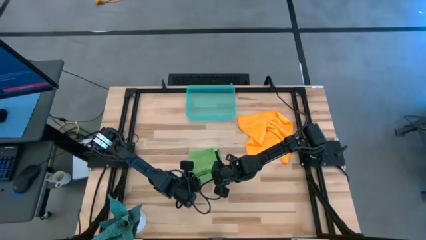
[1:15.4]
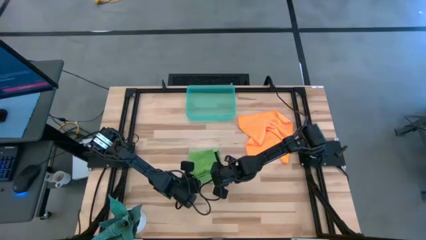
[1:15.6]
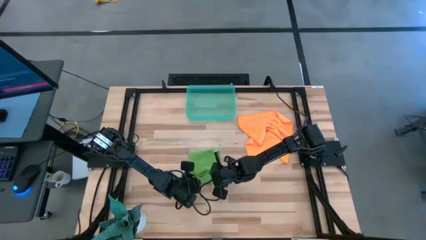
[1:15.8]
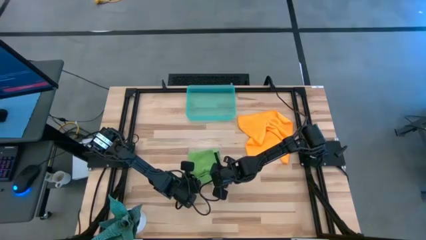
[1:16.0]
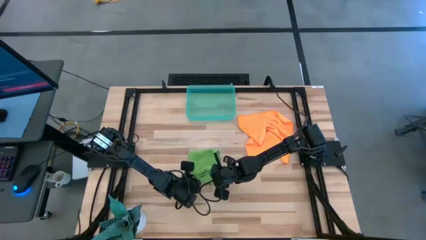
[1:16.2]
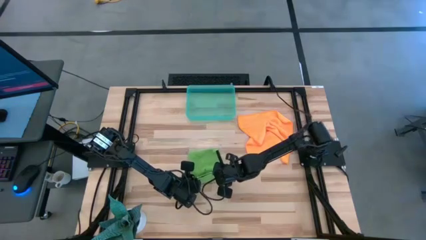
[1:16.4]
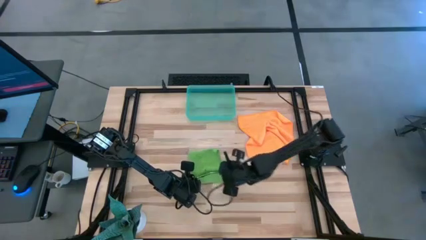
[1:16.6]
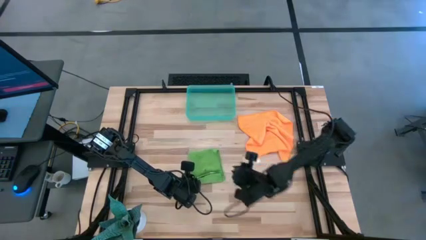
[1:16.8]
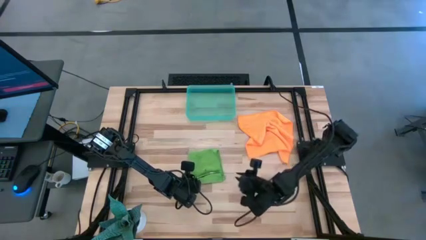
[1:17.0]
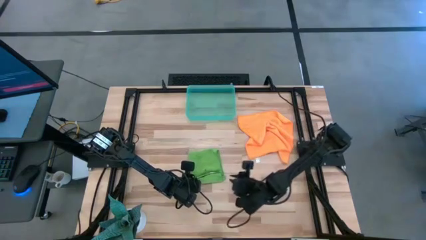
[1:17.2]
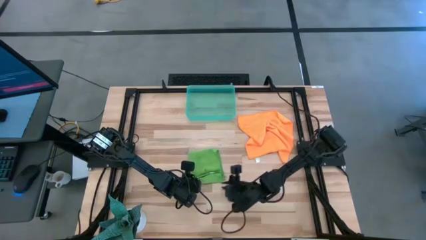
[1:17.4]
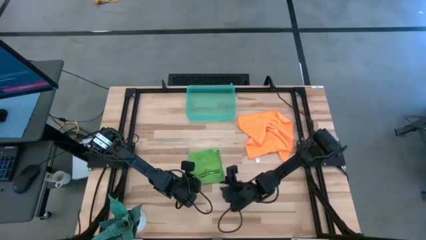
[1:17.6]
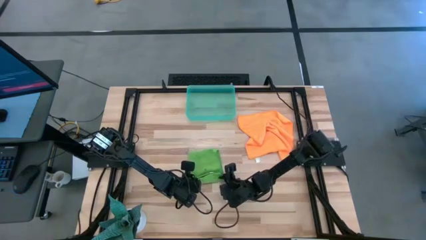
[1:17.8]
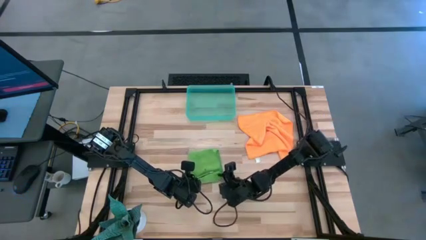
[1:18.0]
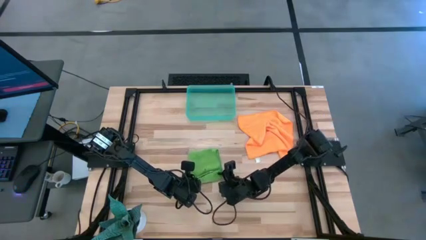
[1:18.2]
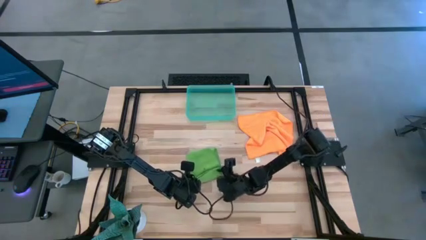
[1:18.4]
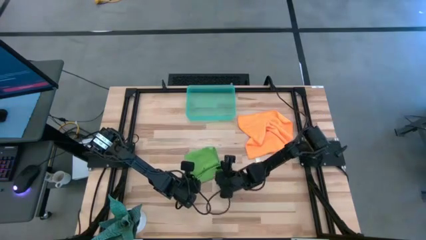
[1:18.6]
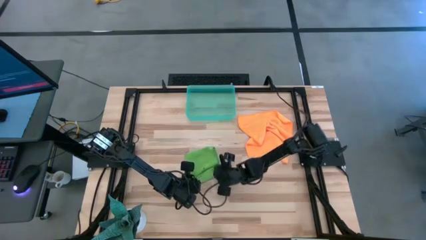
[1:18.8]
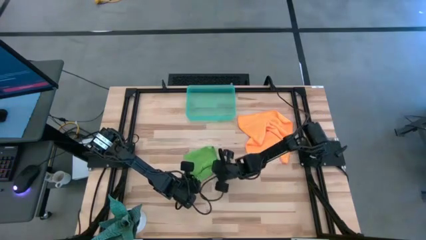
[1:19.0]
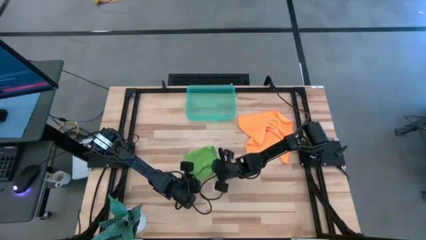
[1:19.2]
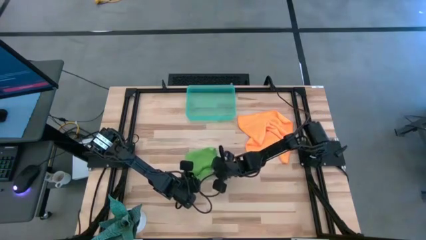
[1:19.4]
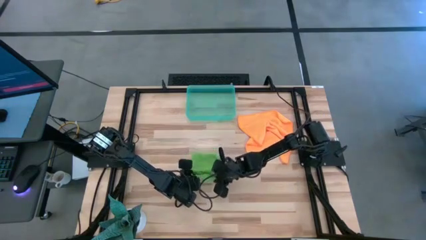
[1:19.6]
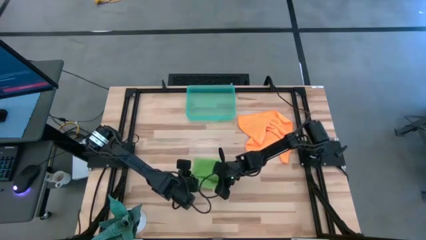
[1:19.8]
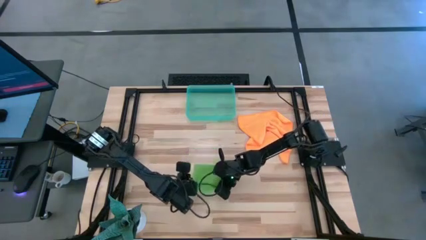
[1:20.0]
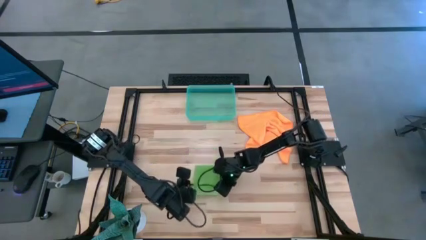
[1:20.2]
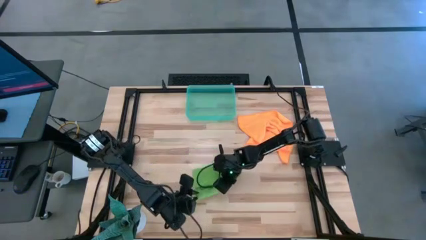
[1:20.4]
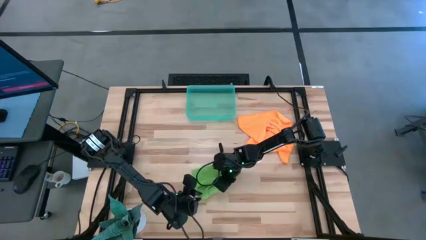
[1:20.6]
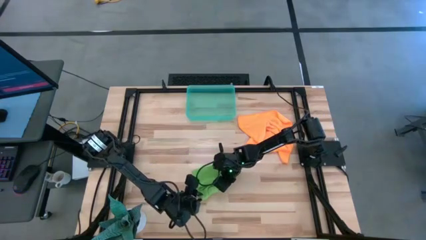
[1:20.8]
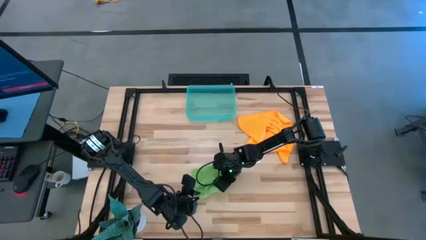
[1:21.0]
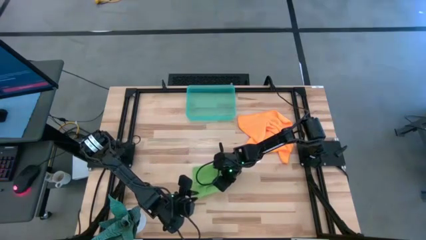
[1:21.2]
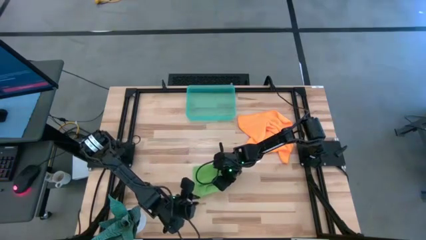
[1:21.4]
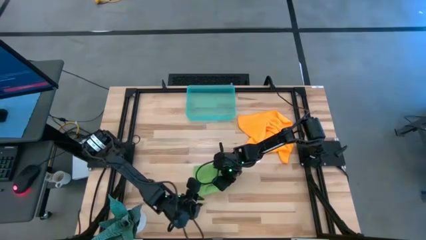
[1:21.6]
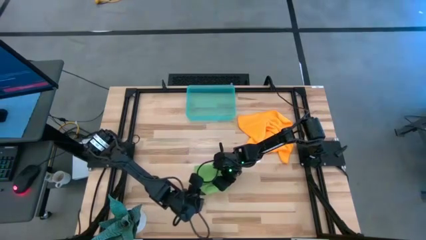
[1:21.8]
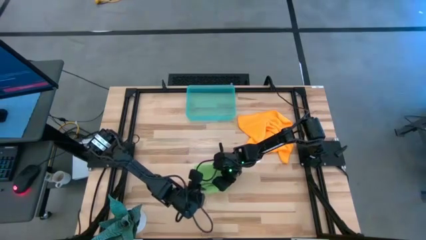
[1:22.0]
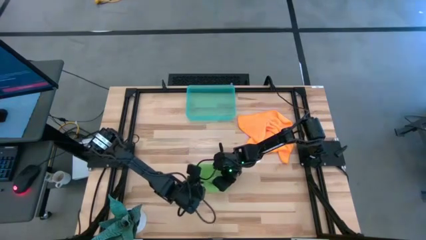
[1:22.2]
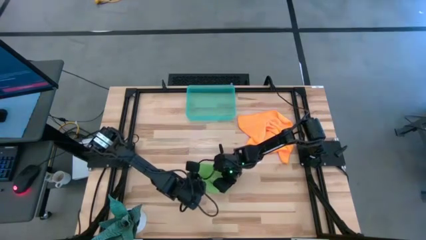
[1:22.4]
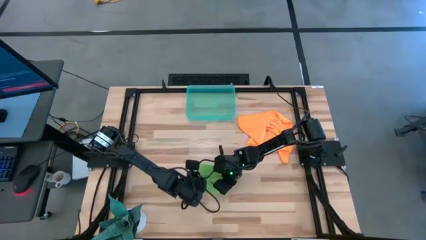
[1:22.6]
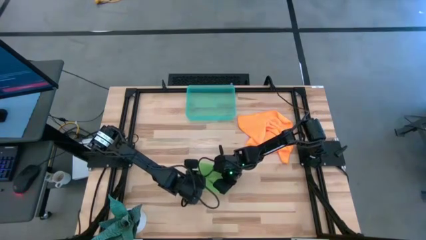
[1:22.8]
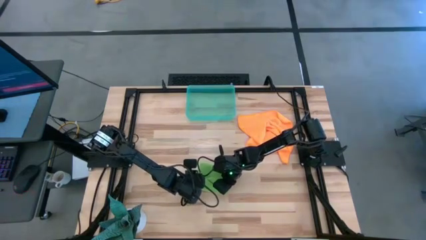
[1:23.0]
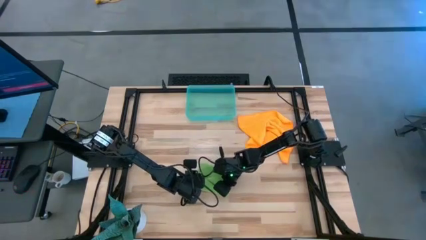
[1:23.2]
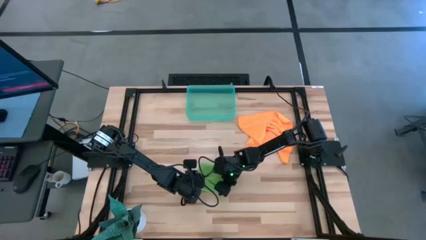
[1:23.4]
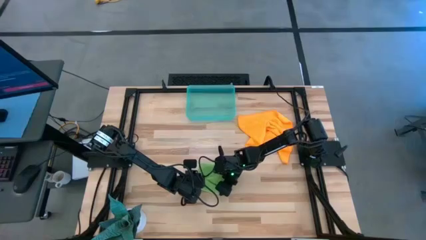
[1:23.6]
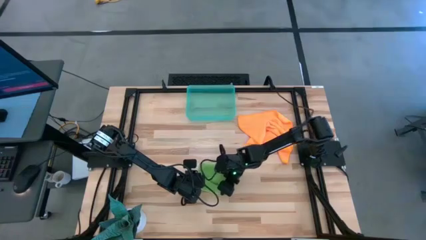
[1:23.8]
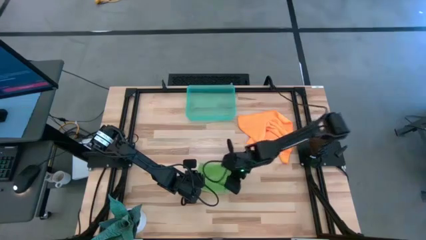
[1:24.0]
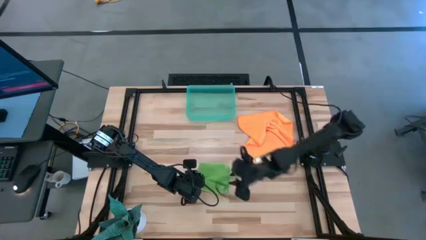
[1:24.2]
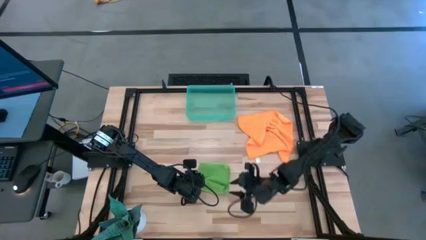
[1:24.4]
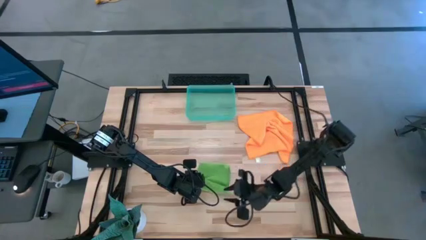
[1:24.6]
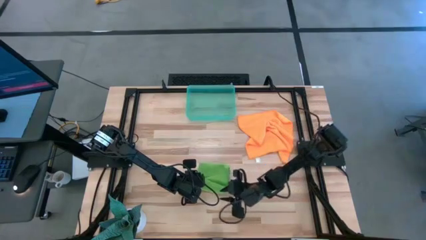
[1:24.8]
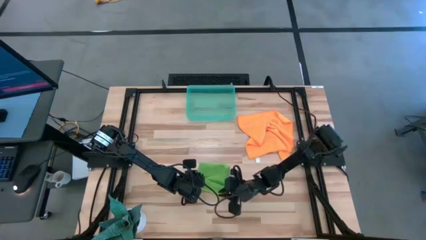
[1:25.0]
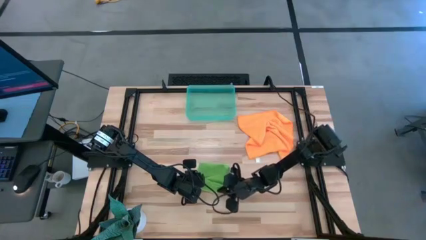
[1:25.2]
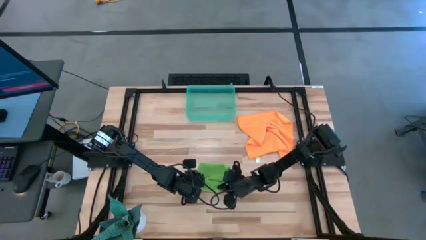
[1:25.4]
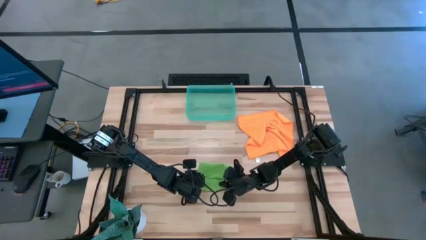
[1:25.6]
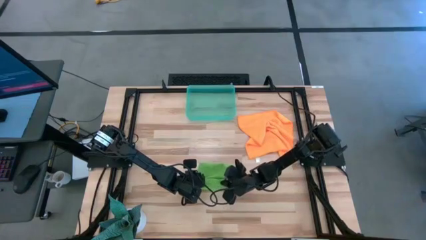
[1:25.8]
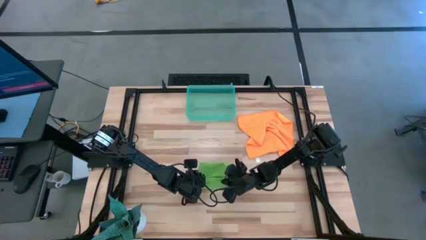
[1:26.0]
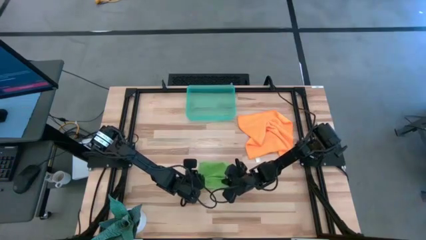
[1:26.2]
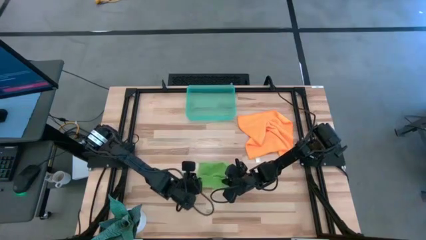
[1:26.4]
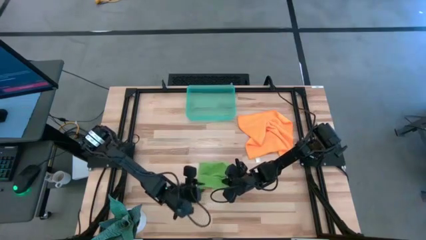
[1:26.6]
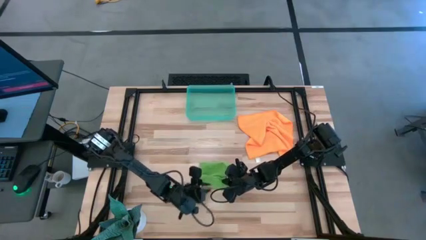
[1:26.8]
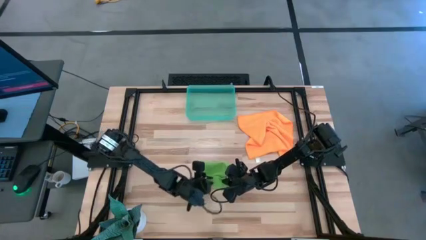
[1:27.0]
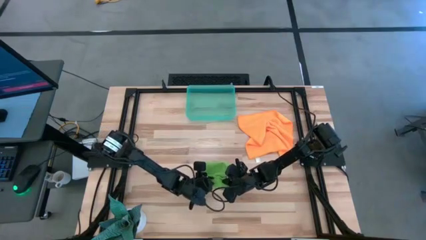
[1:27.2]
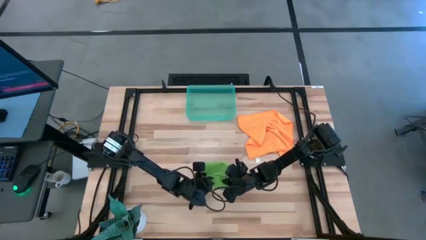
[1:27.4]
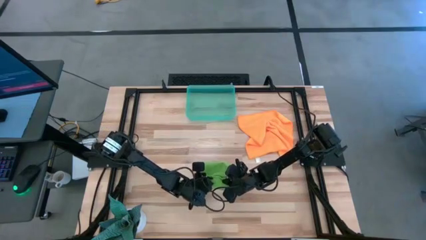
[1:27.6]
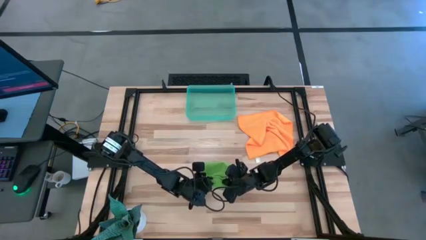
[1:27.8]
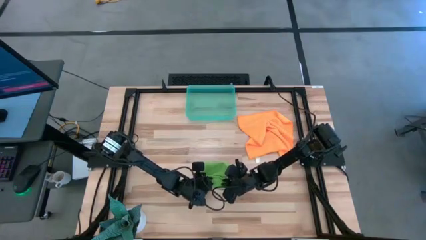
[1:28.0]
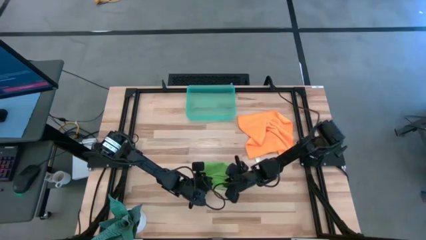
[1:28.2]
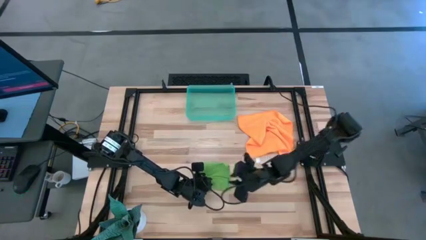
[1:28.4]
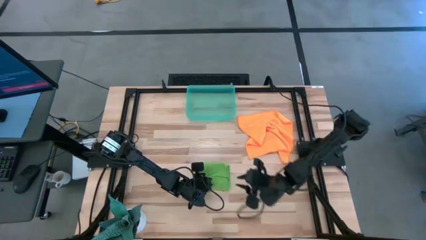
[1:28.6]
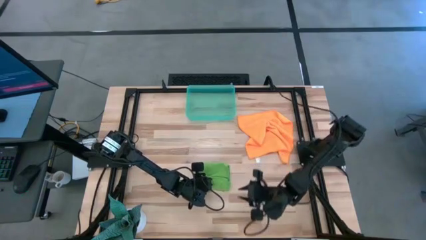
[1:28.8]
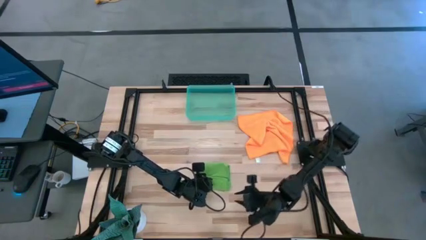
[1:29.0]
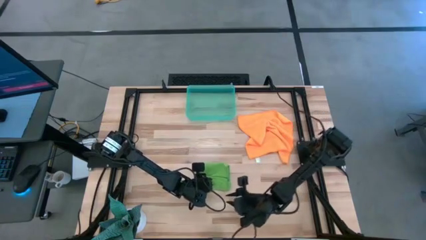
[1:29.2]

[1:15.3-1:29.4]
Task: Roll microfiber towels into tight, uniform cylinder then place into a basket
Roll the green towel
